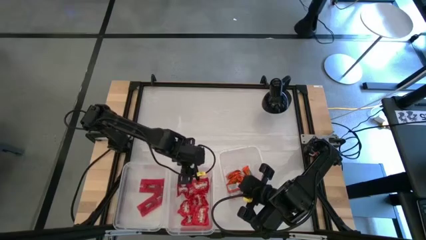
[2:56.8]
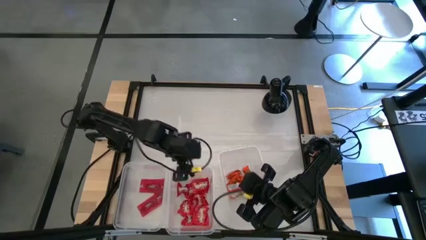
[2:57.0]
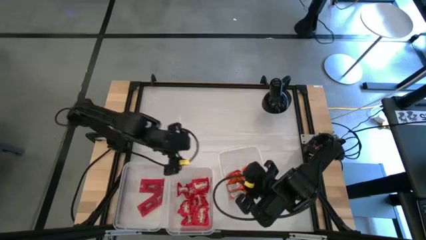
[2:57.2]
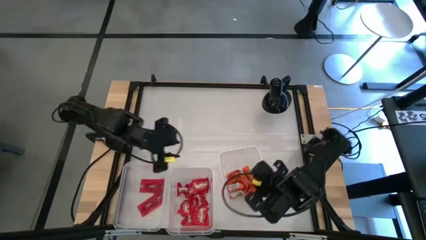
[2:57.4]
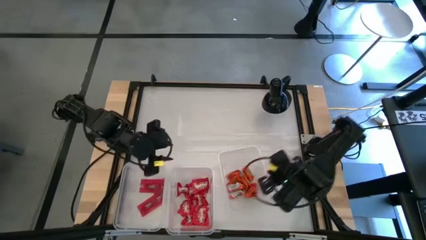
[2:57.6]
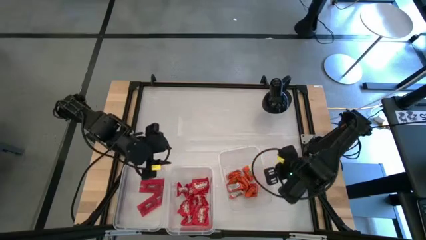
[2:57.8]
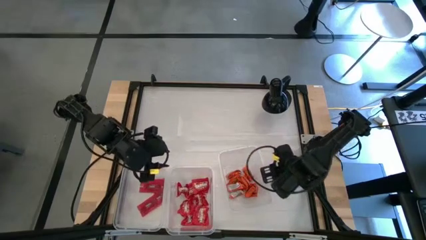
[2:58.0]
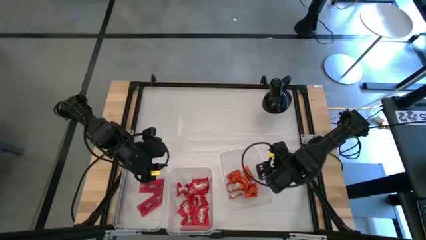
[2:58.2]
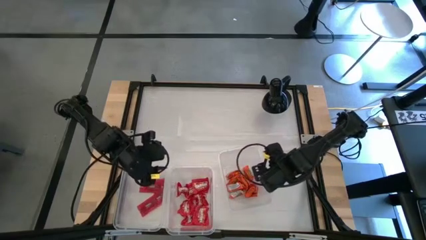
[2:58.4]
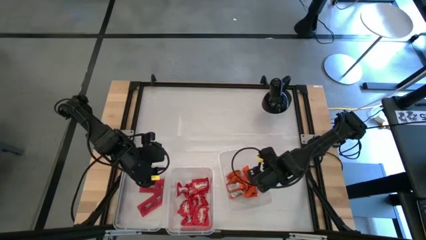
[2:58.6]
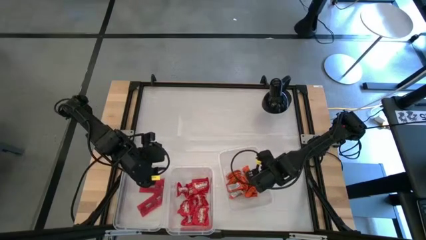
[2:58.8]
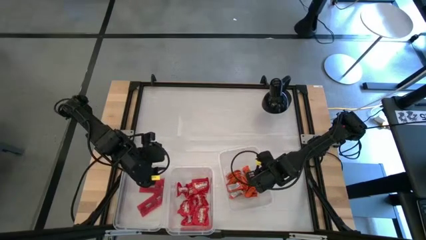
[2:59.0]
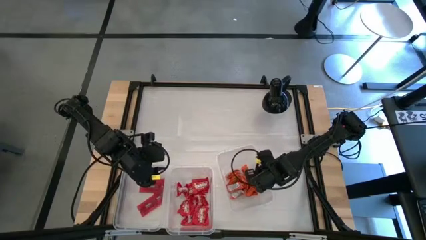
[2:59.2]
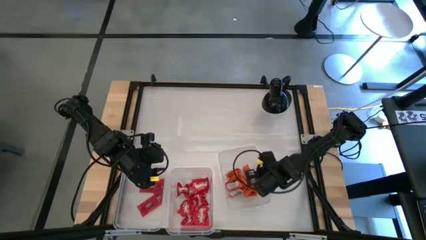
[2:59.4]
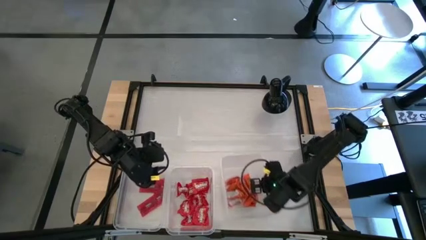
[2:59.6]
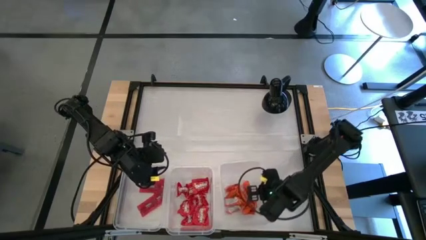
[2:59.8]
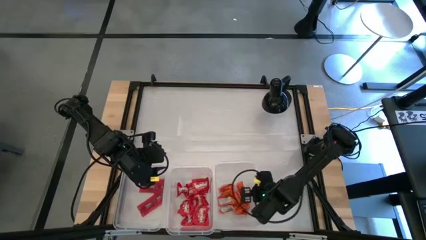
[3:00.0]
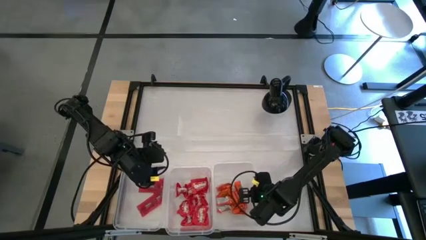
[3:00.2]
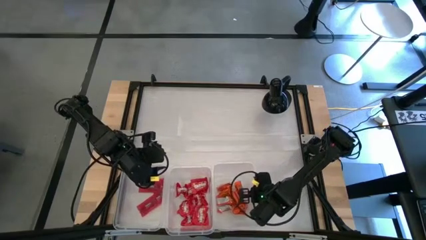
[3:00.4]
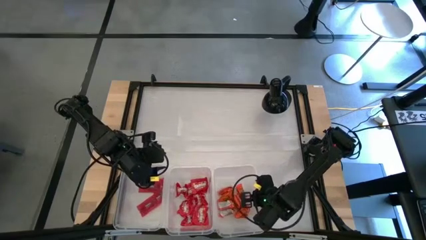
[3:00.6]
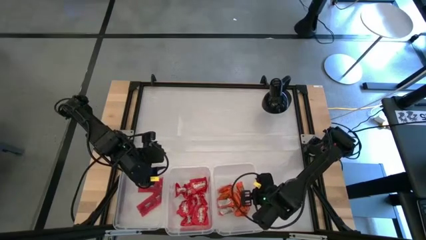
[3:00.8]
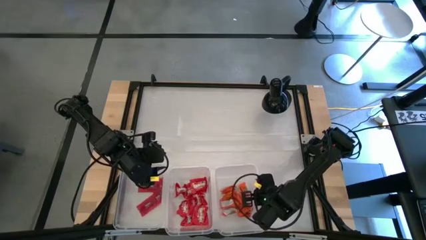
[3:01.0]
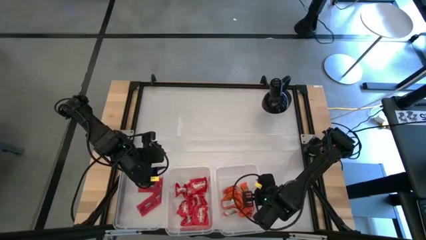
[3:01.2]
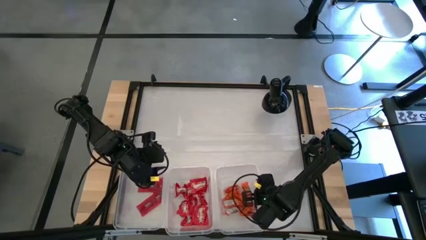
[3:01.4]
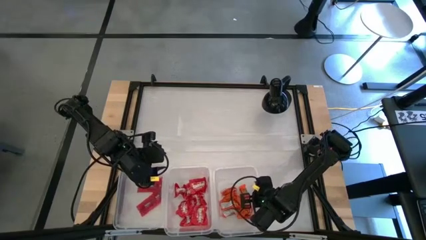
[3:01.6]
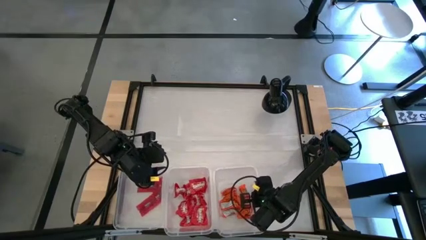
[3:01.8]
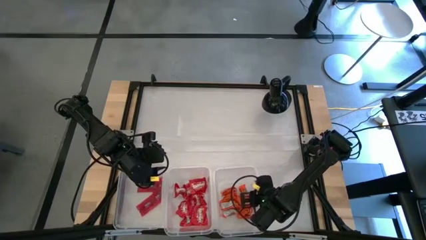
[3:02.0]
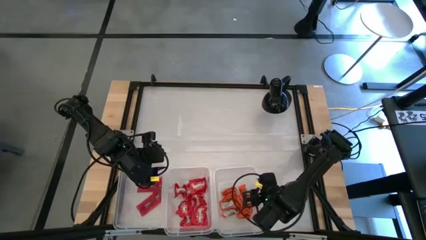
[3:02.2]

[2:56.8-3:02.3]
Task: Sort candy
Adjust the right transparent bin

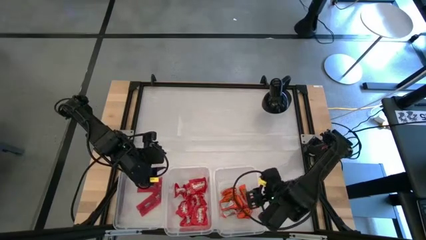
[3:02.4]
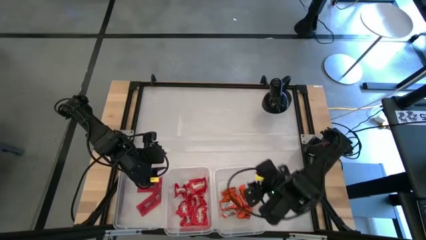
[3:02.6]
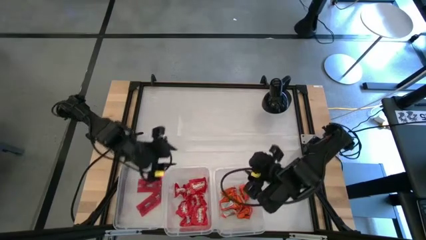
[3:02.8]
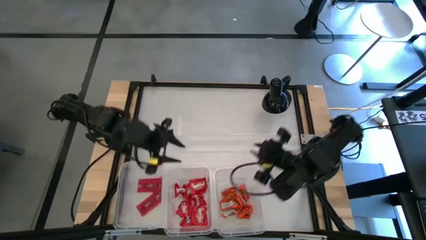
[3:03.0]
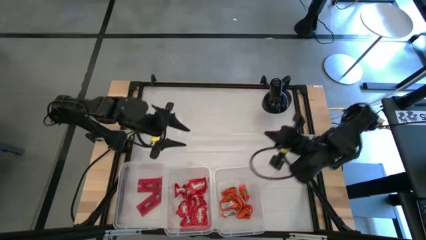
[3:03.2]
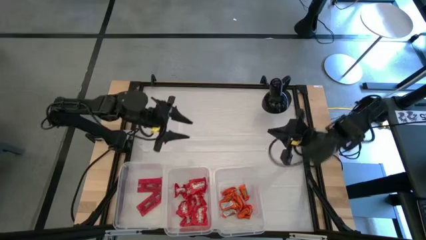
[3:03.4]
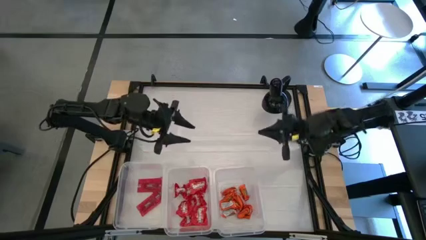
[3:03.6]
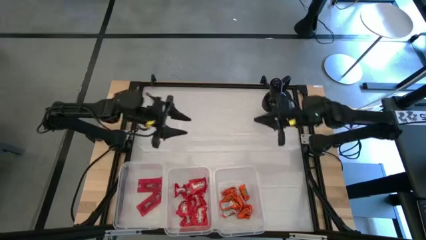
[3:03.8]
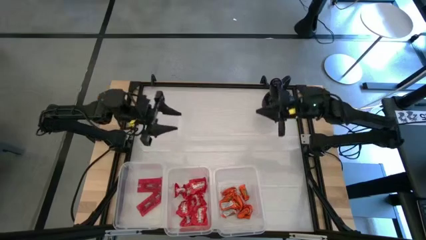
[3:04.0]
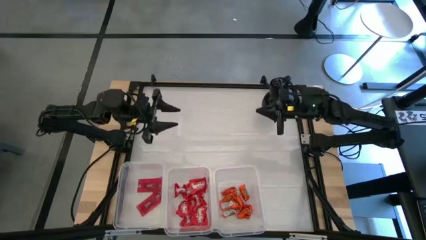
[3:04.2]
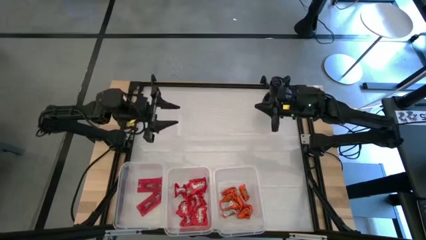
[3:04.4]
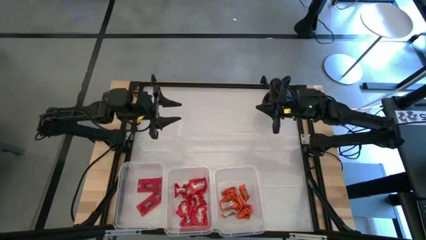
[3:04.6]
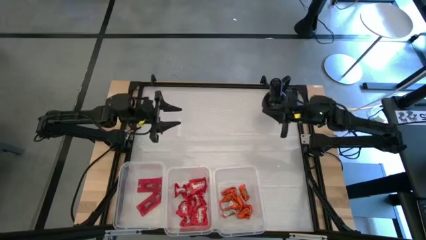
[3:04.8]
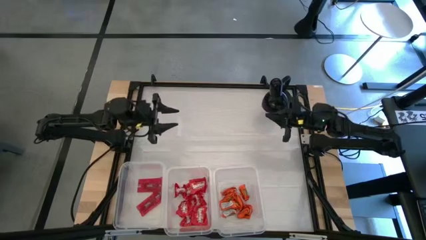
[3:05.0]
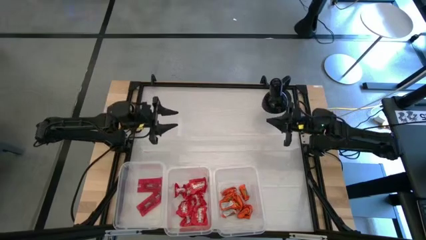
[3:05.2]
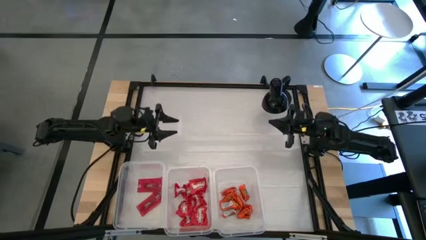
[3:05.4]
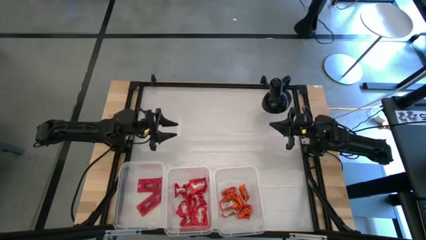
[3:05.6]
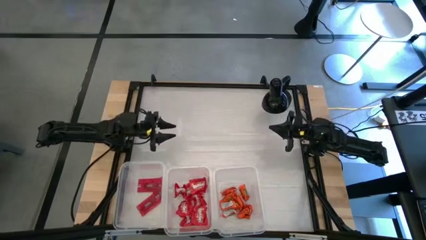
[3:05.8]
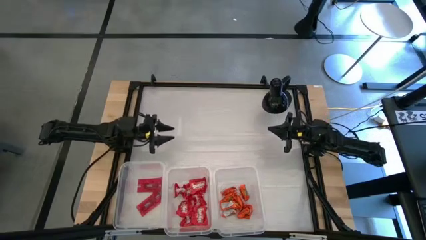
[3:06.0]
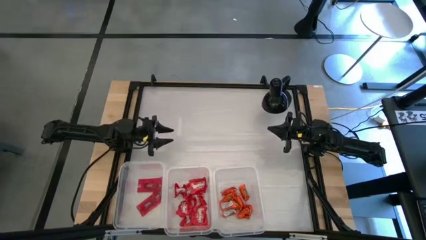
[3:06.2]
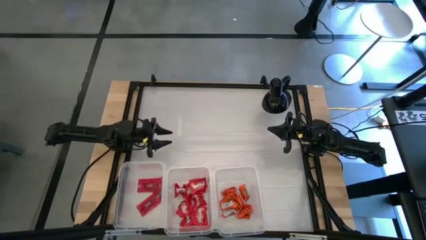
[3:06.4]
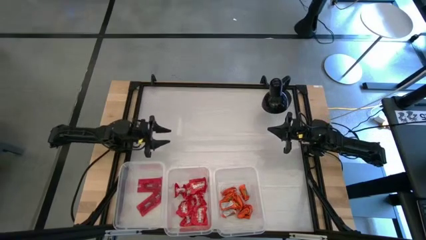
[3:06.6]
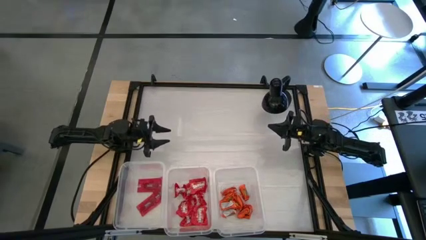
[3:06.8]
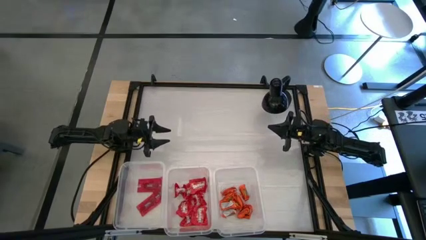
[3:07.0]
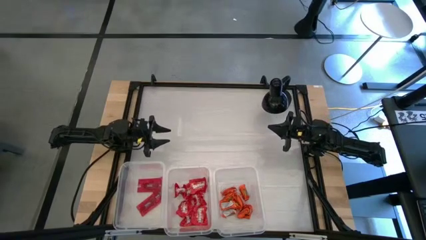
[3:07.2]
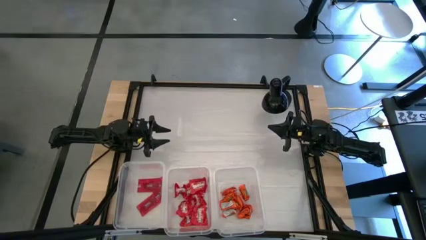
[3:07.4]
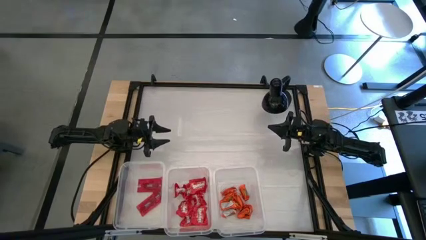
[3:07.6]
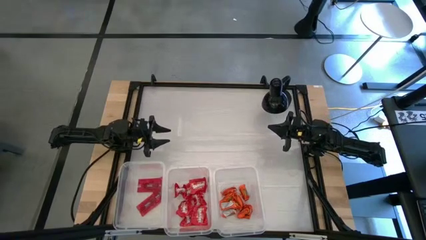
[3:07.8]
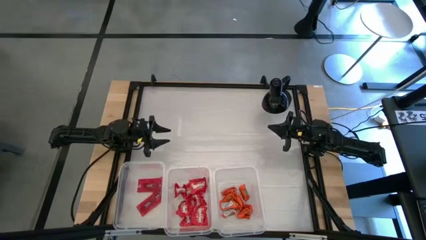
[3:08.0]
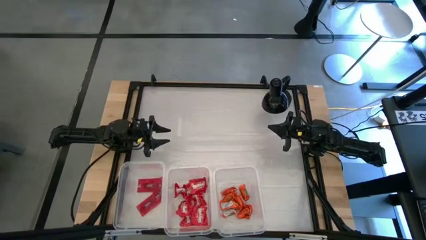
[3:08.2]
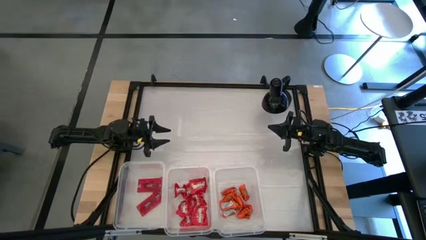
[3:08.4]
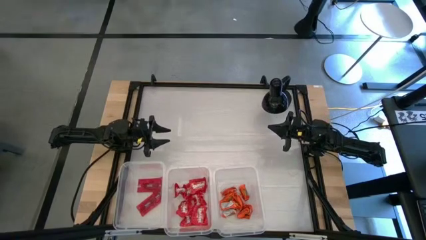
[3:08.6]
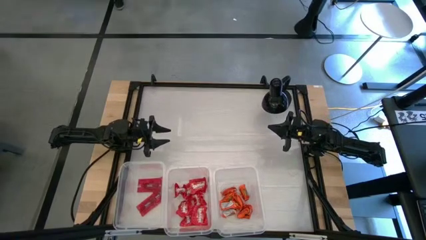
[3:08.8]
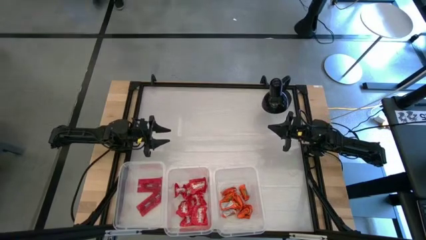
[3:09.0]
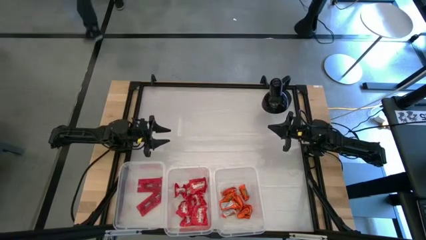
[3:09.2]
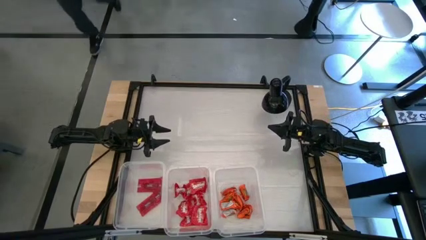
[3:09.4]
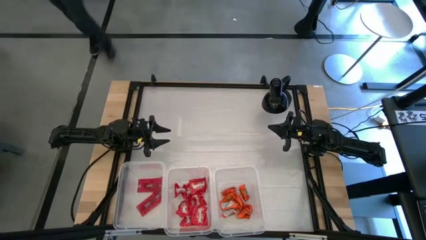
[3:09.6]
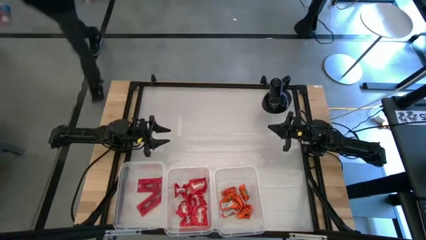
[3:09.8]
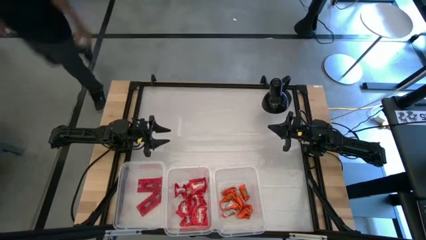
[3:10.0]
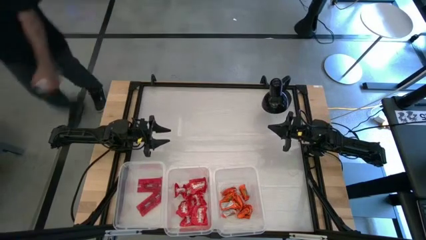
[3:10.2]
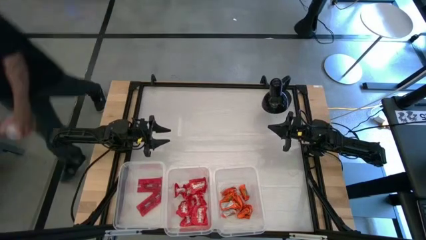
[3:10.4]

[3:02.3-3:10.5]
Return to Home Position
